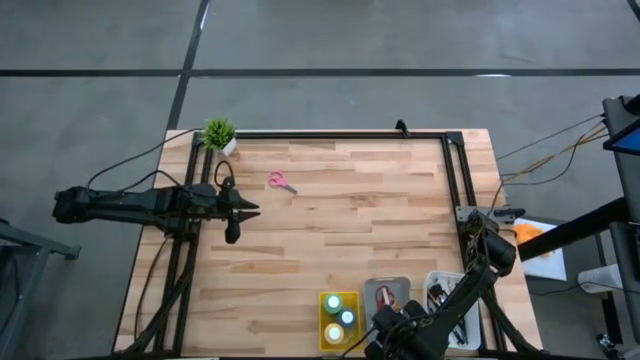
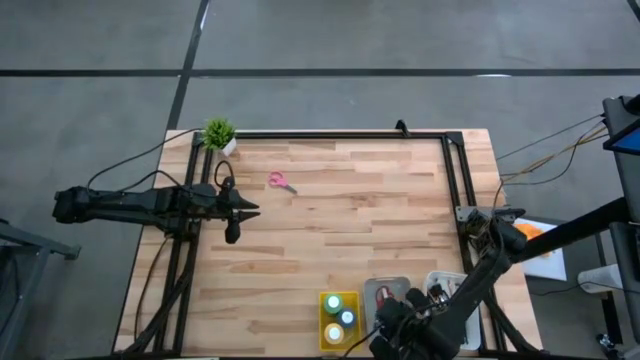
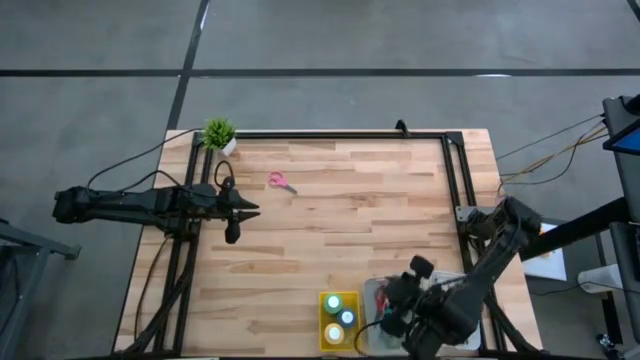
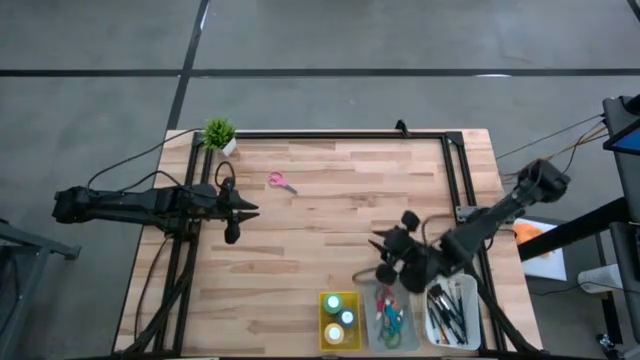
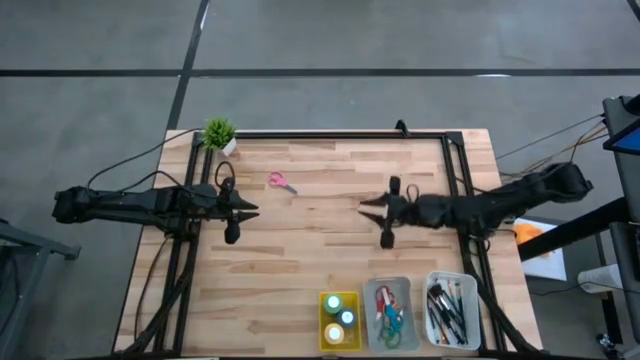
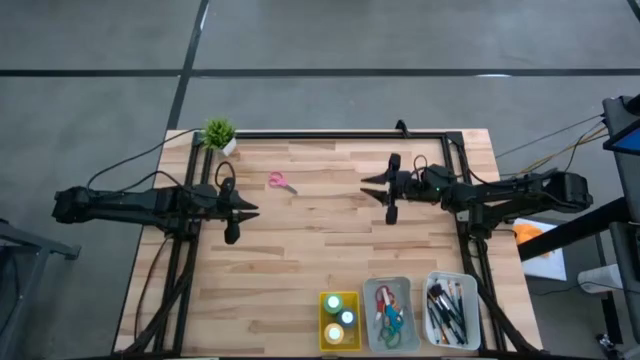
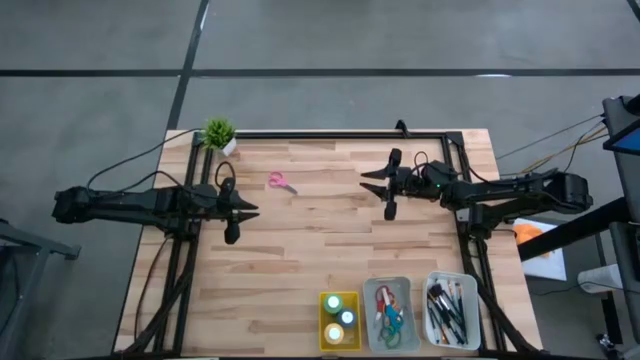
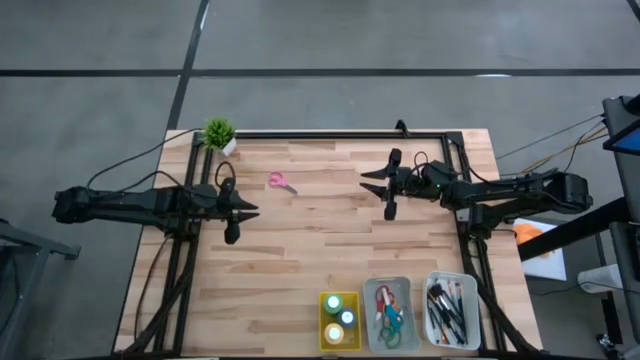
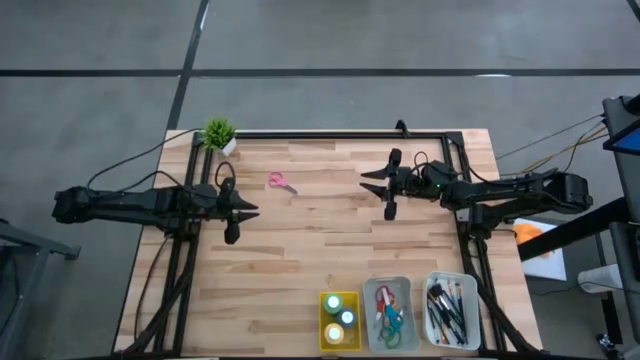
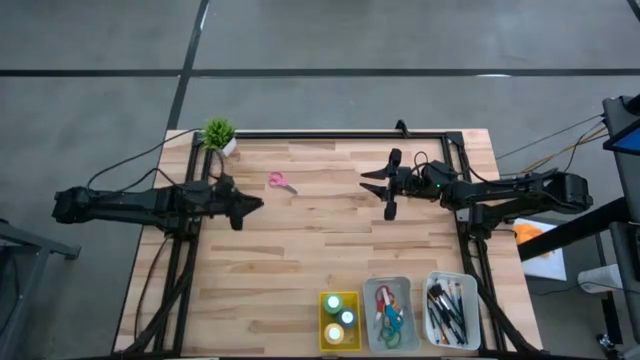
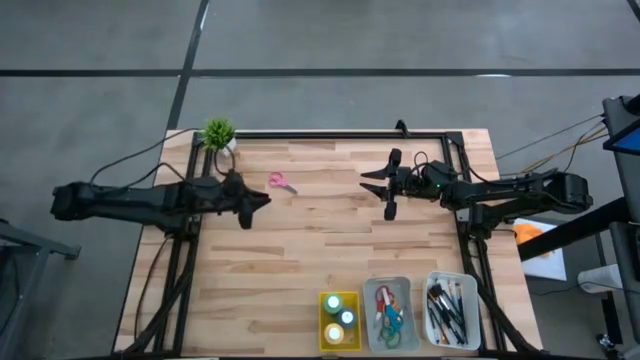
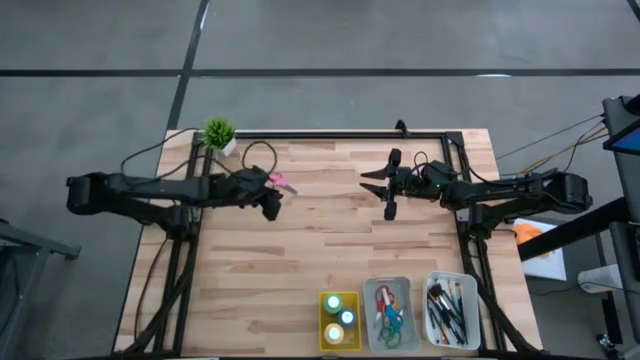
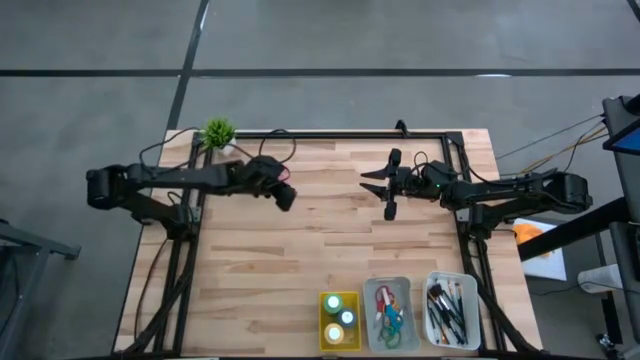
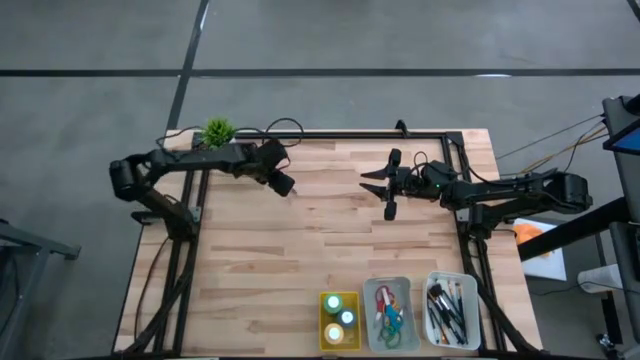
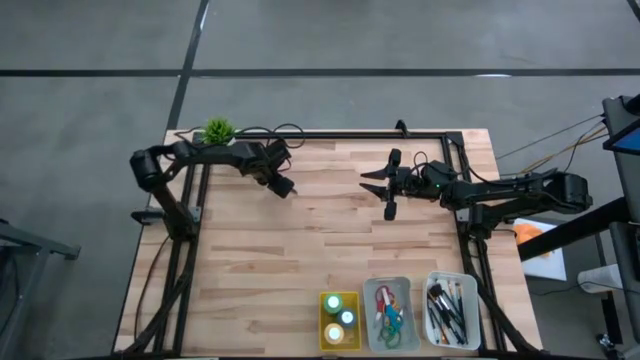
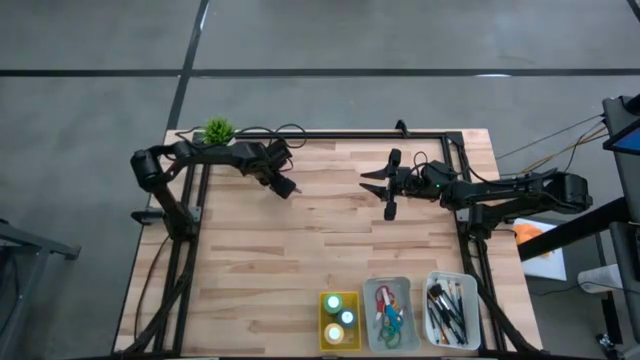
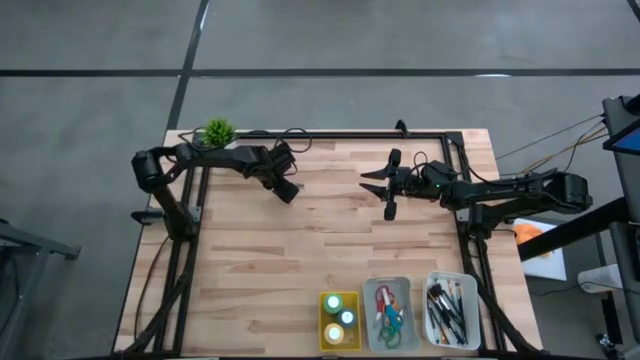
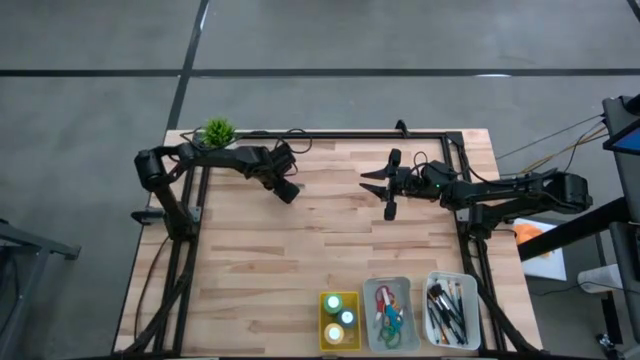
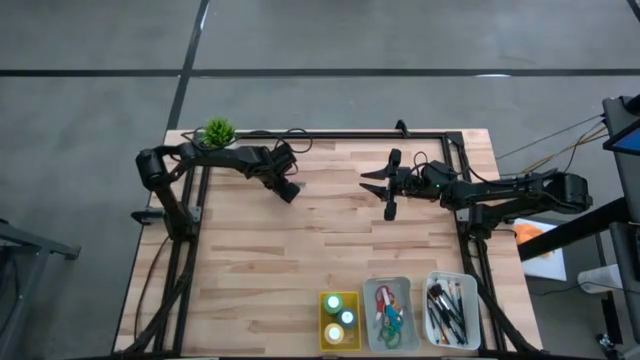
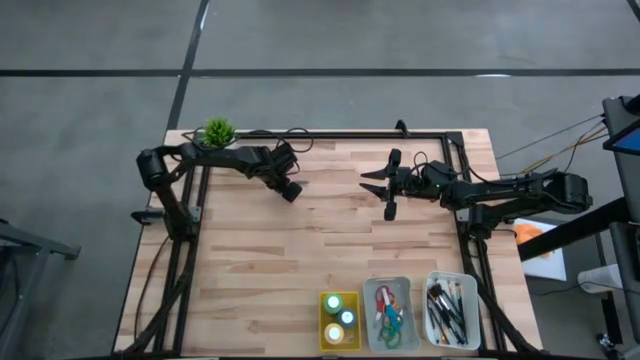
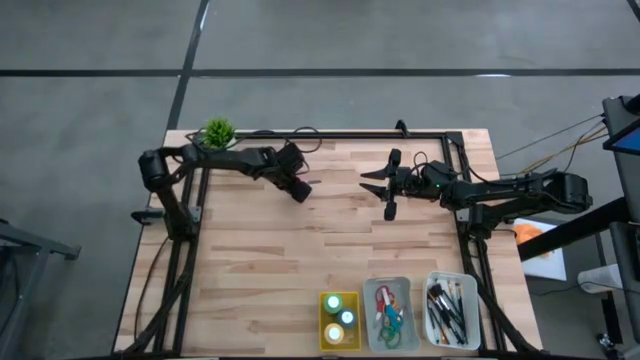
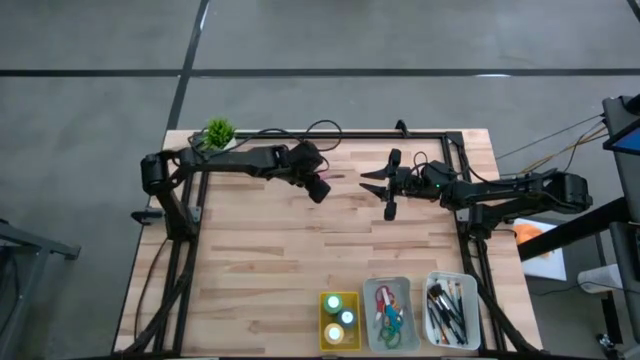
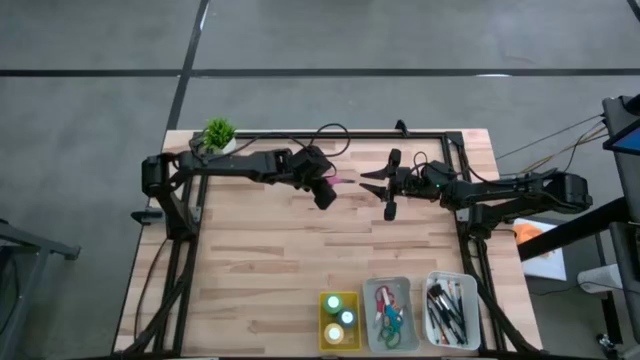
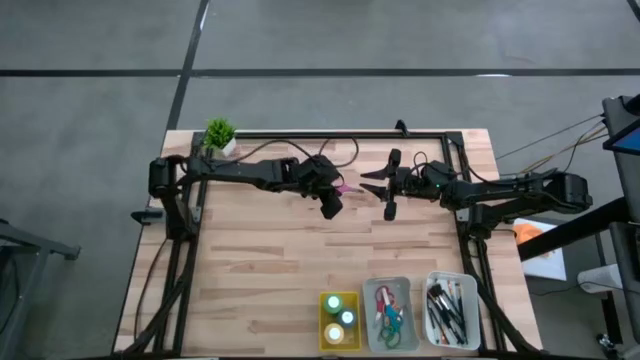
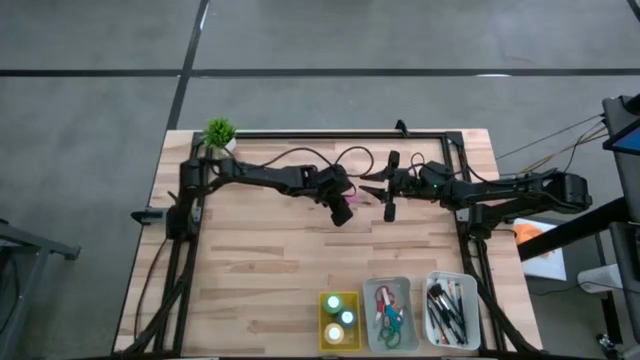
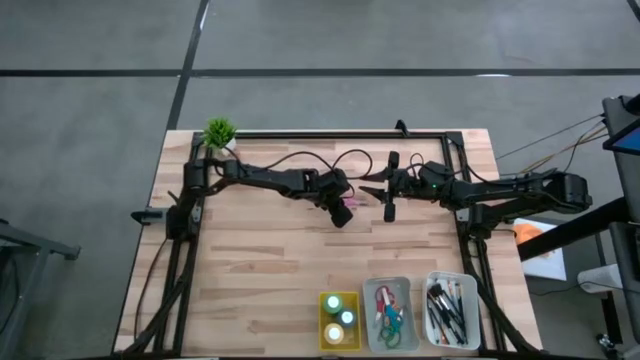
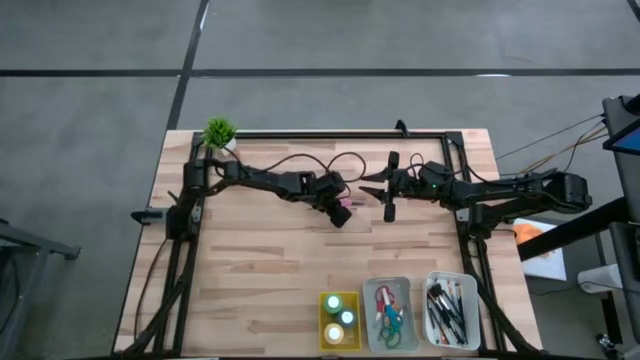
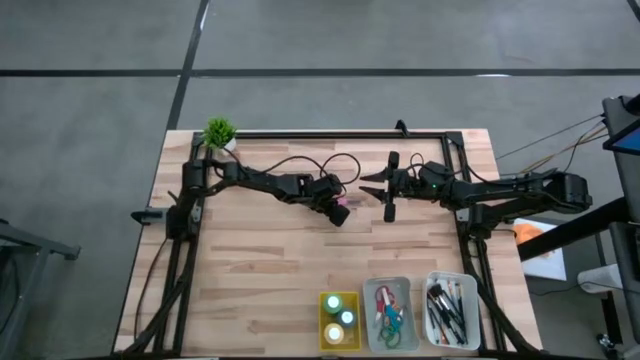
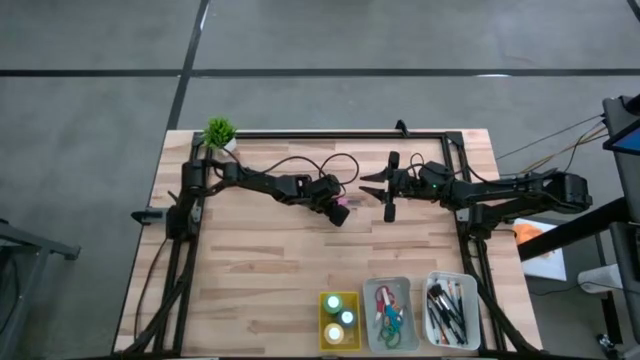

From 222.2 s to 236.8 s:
Task: Pick & Place Paint Supplies
Put the pink scissors into the gray bin
